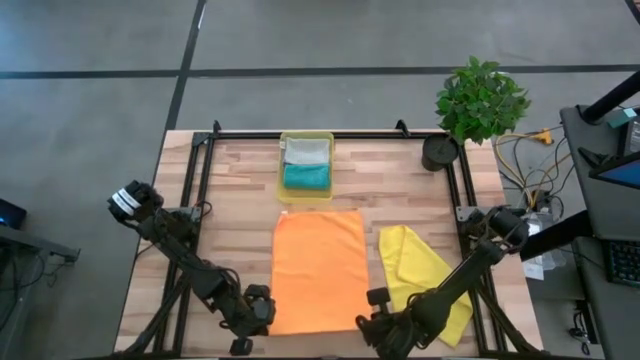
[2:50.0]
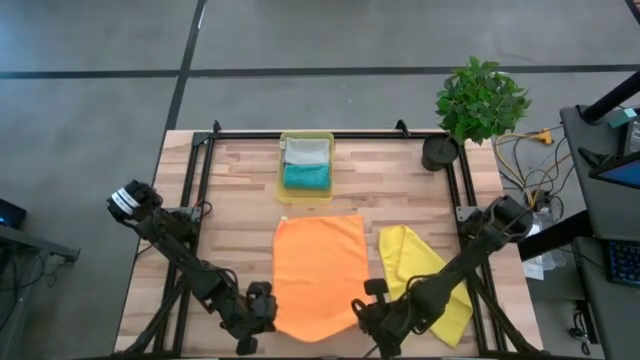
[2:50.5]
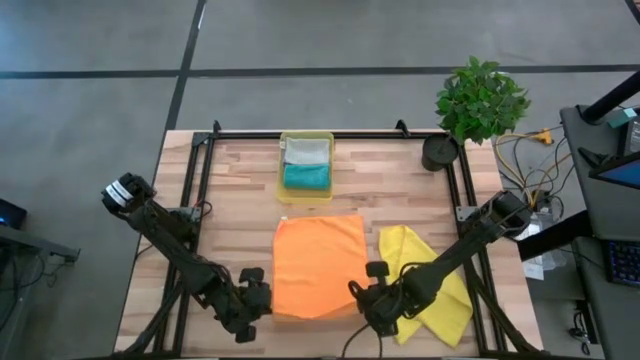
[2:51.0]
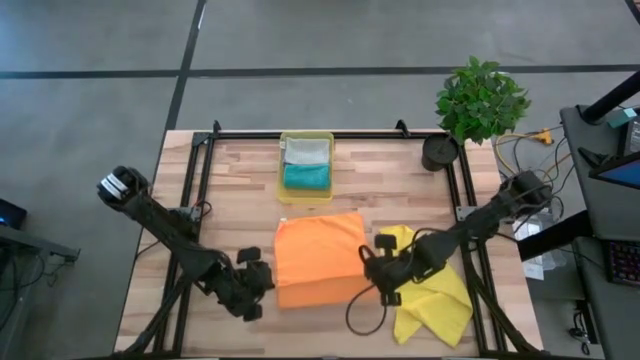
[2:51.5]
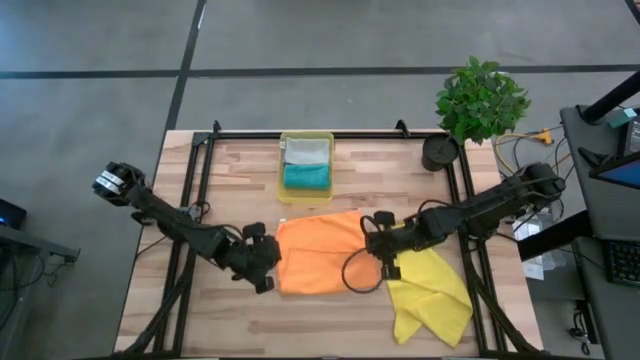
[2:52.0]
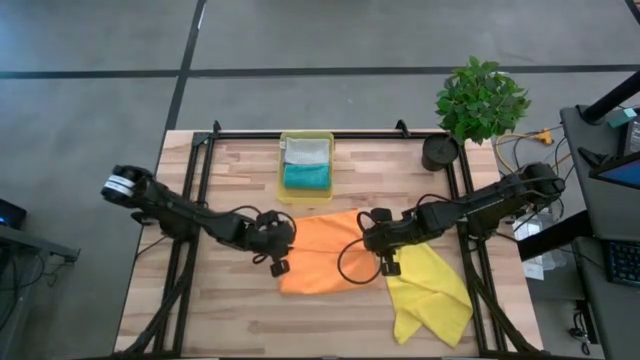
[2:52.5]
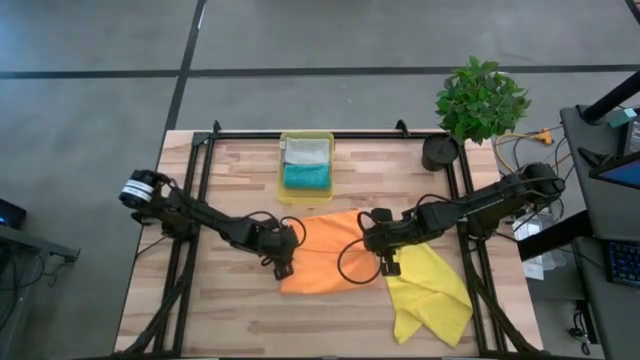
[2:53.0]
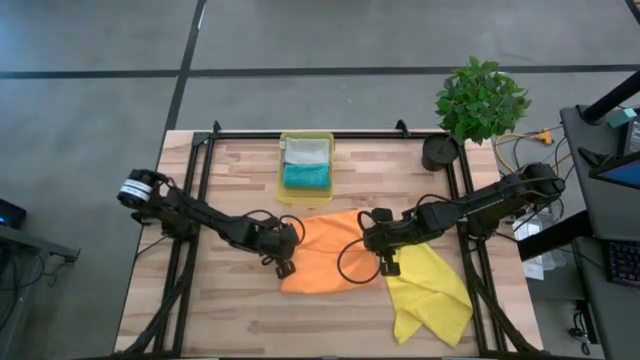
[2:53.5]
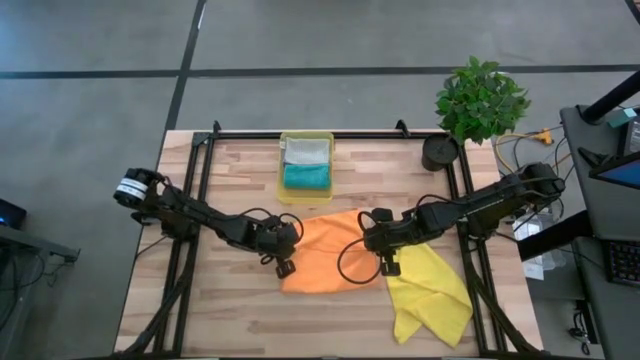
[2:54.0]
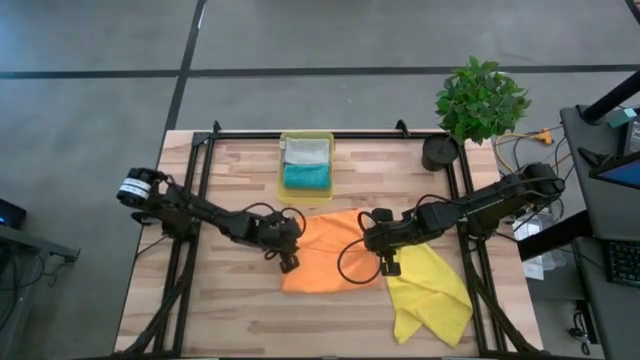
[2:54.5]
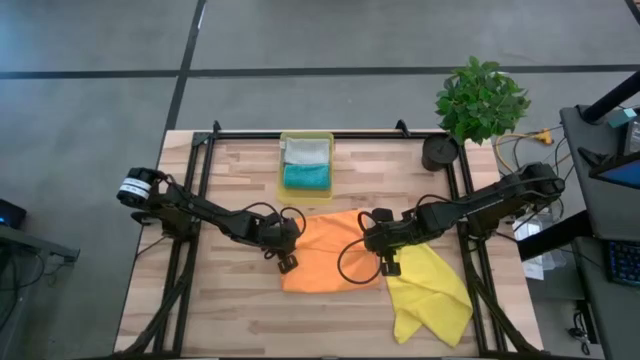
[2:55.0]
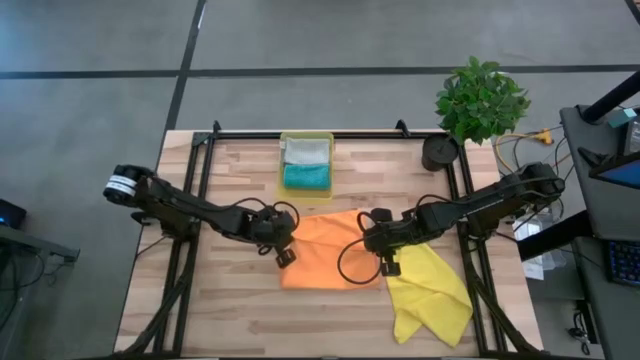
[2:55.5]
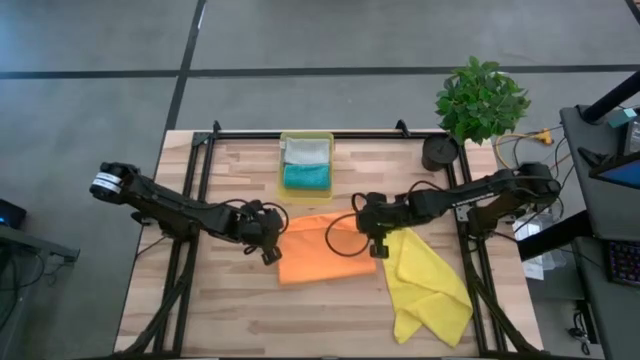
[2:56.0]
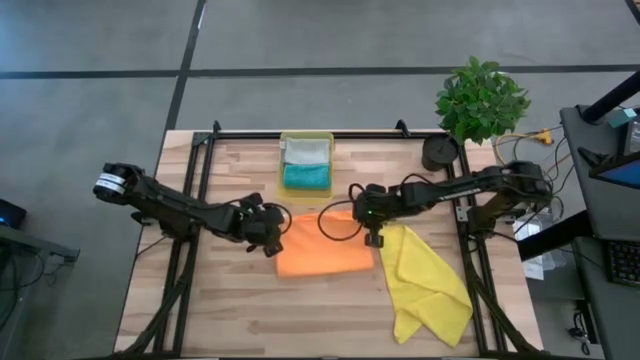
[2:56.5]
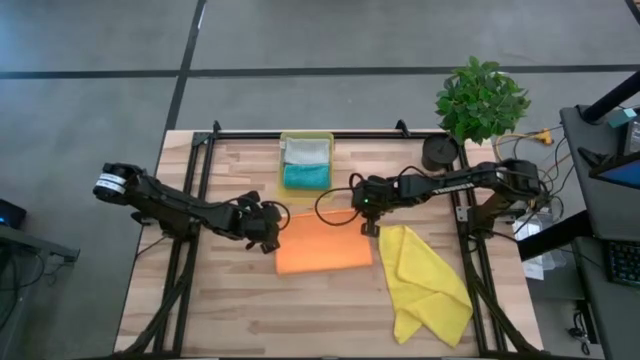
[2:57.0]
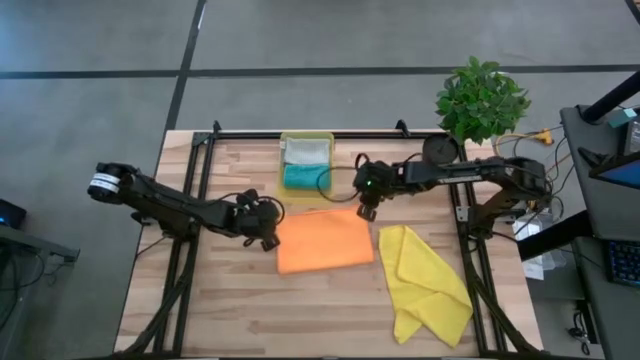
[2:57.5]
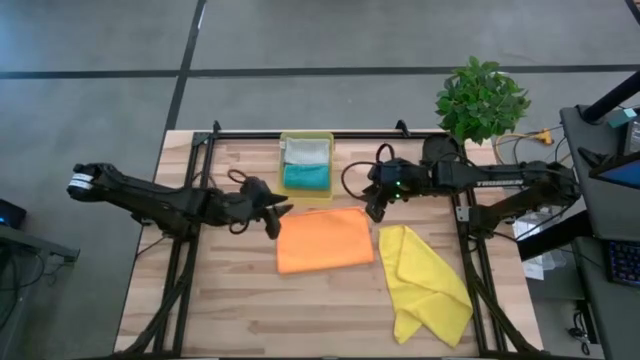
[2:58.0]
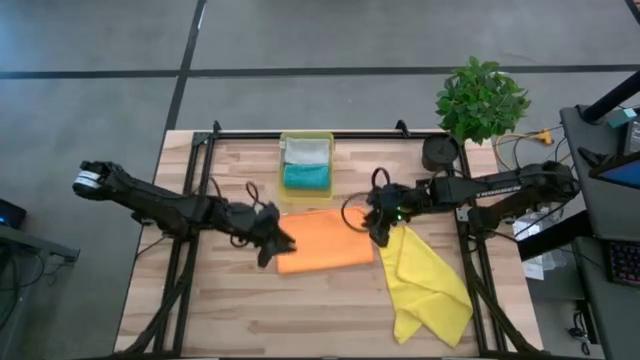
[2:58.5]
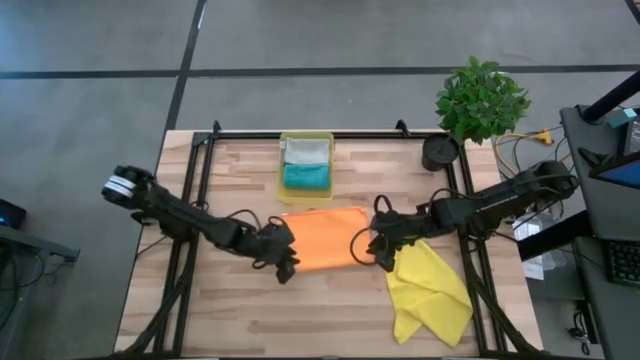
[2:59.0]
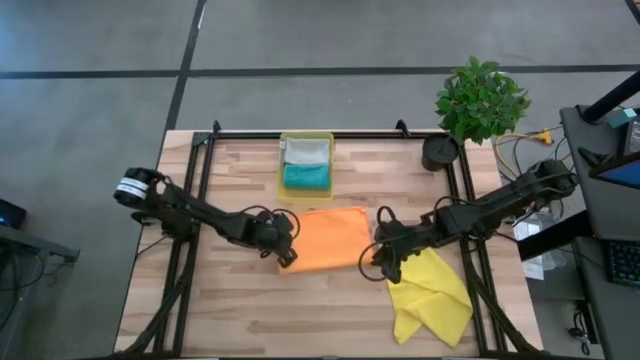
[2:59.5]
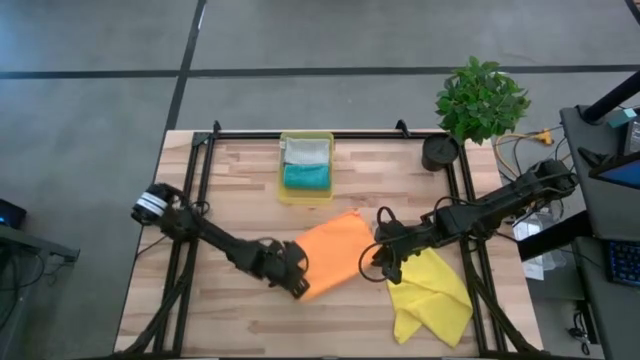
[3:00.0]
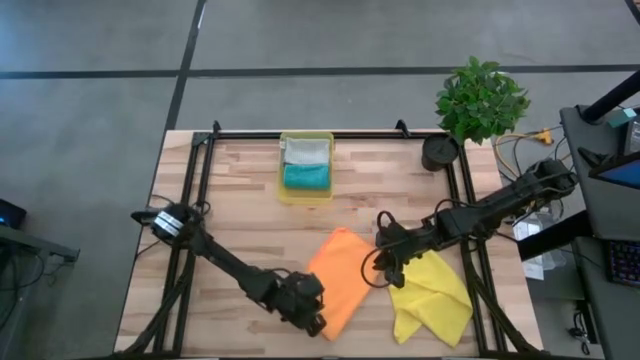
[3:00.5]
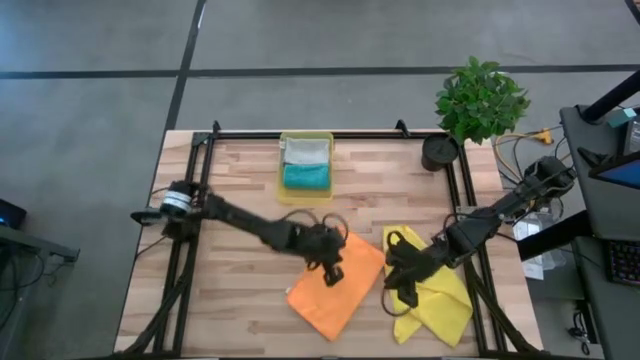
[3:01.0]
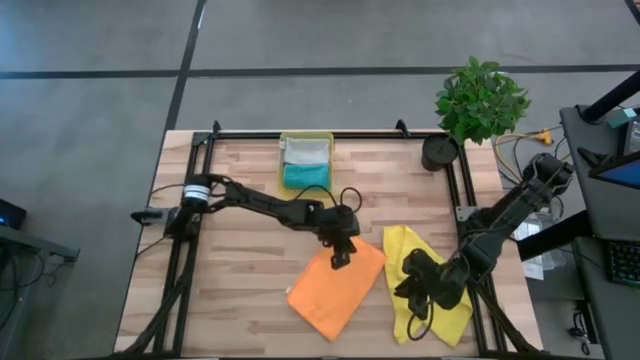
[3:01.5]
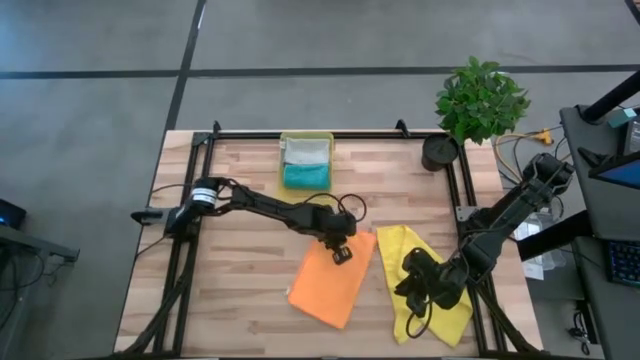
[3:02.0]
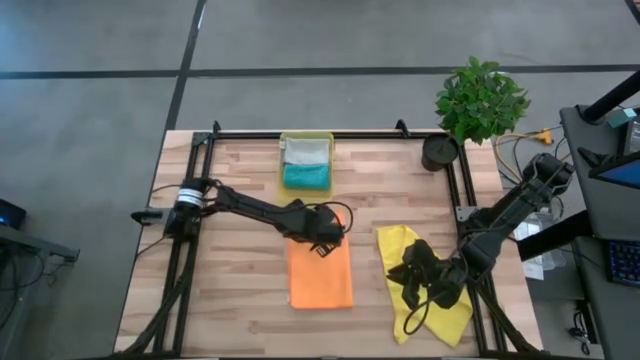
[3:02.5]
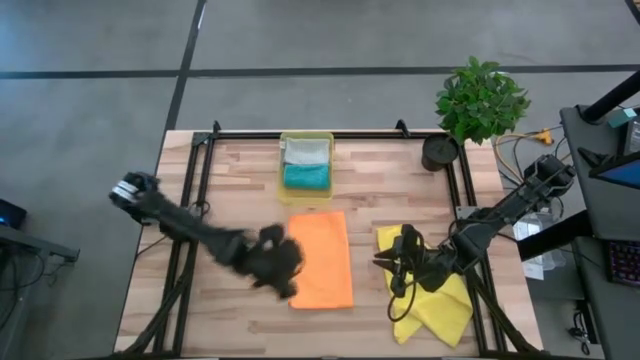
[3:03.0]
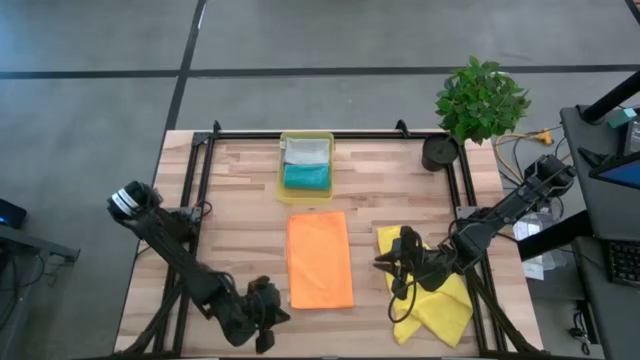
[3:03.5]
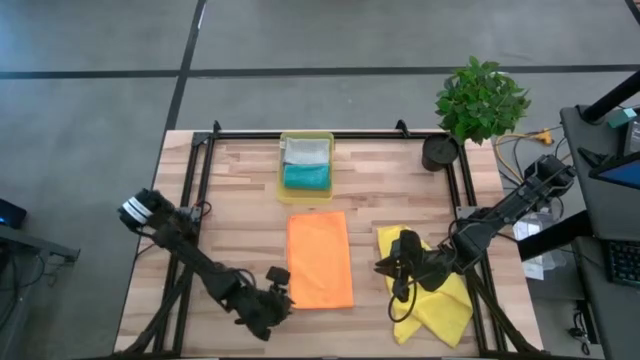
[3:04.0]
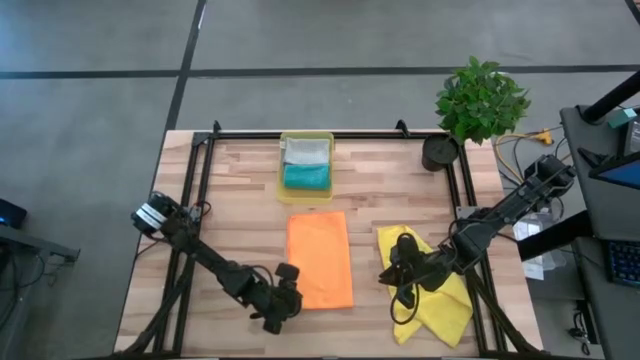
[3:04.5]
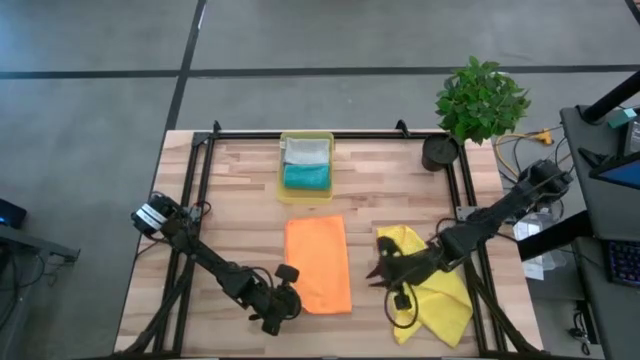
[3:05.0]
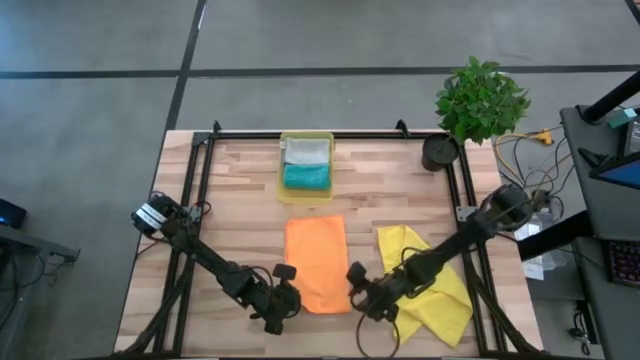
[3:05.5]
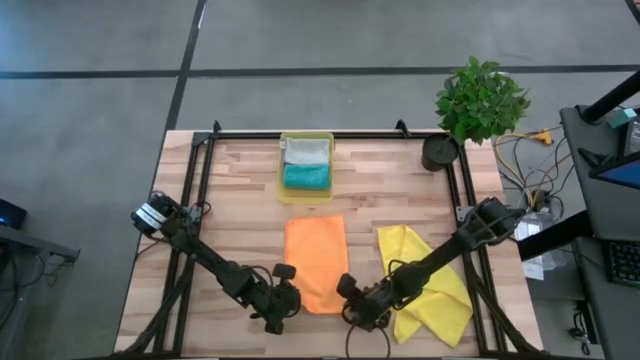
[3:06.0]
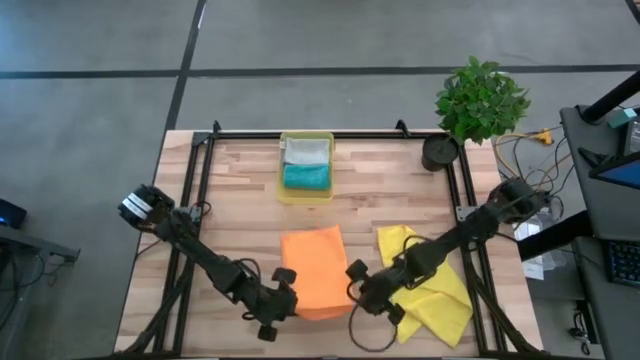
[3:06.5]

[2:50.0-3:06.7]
Task: Fold microfiber towels
Fold the orange microfiber cloth

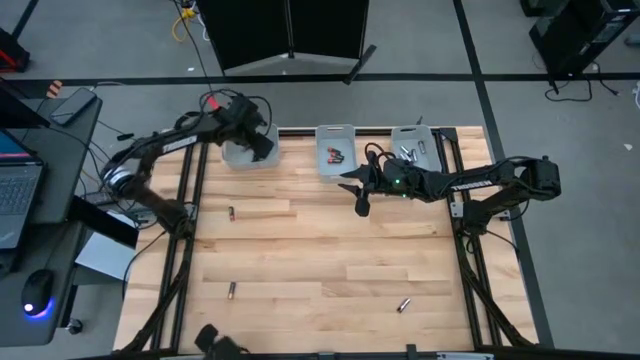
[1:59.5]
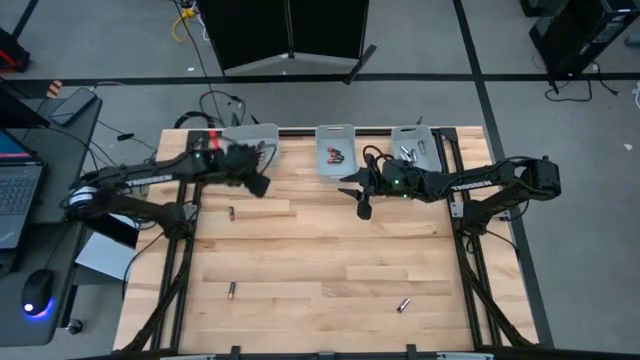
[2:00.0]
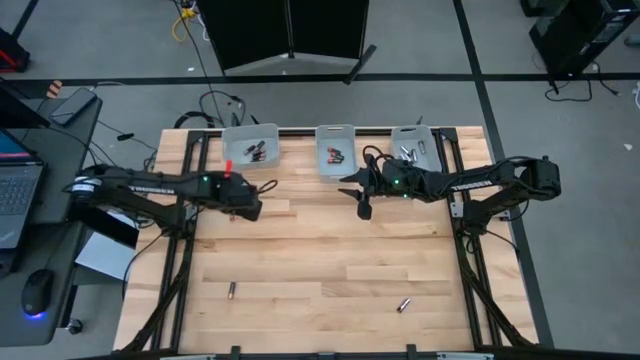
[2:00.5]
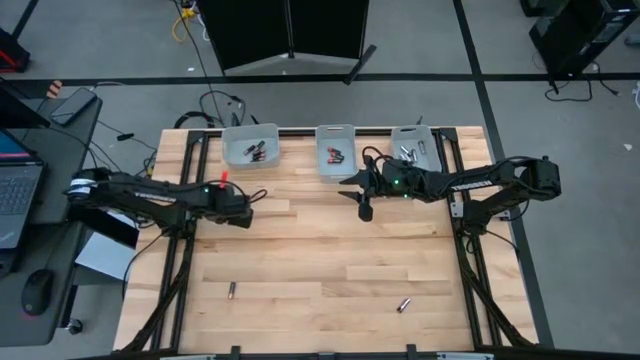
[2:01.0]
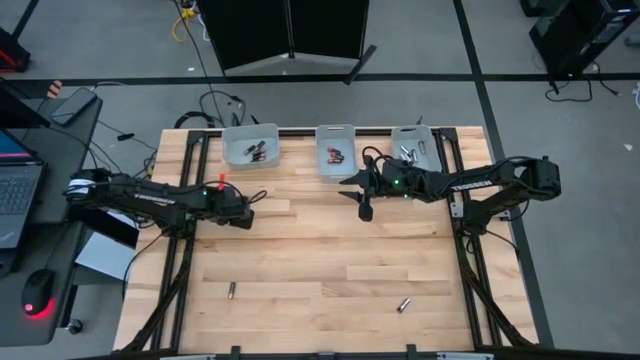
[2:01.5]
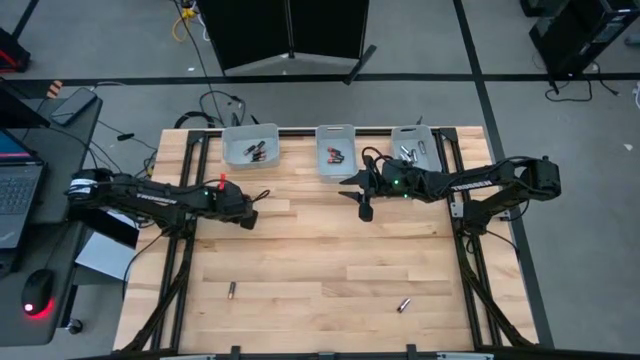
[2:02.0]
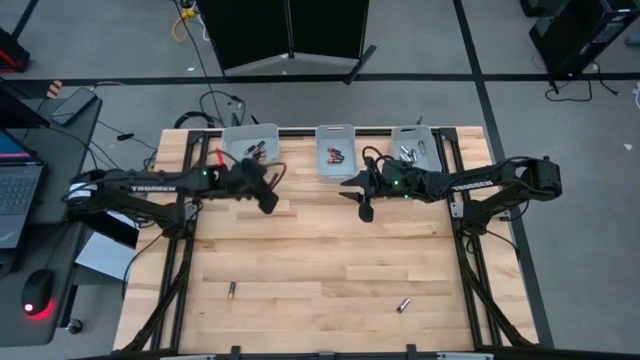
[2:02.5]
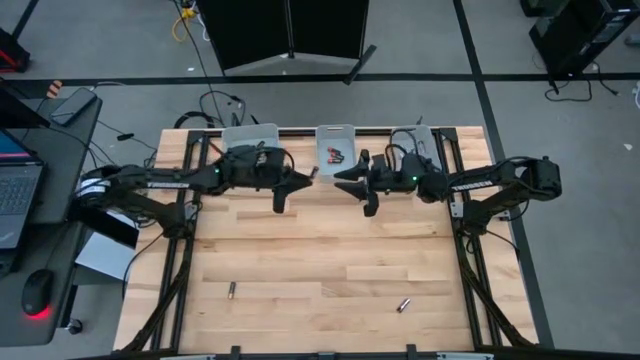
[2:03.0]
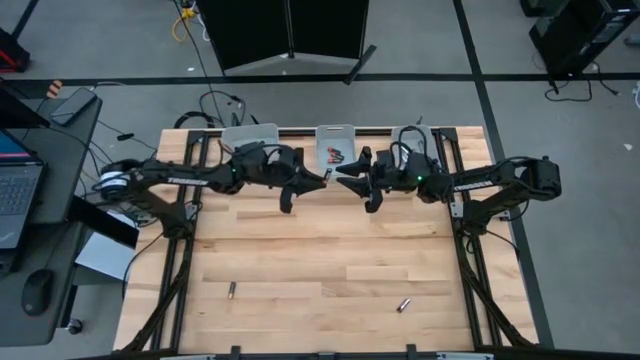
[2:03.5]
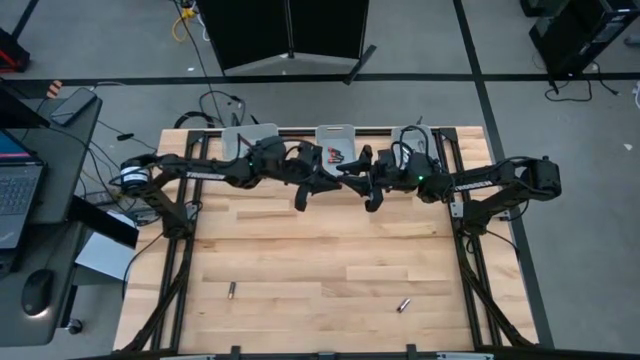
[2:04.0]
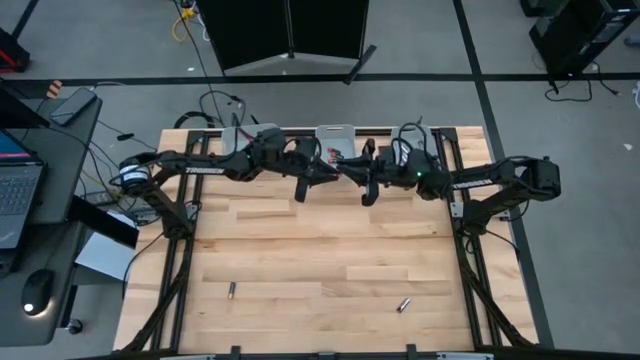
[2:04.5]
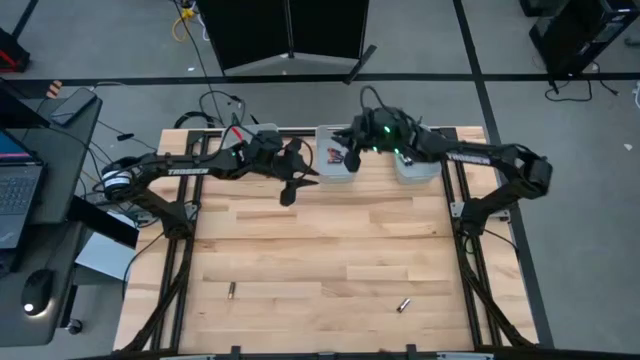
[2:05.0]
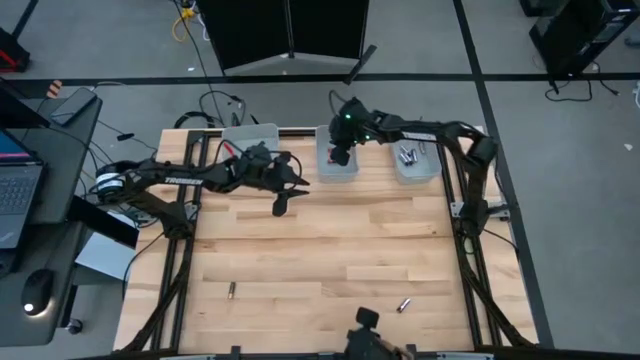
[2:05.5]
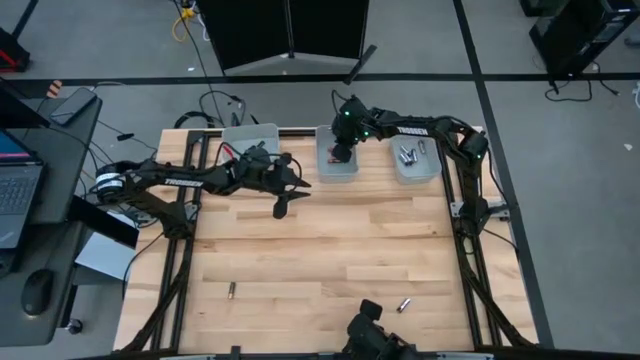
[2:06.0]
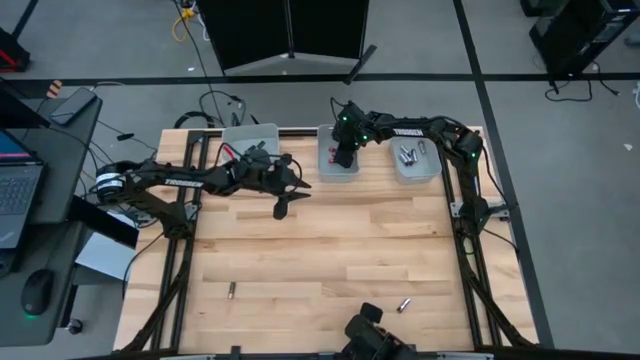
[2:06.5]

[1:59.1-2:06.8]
Task: Sort batteries
Put the black orange battery into the middle bin
